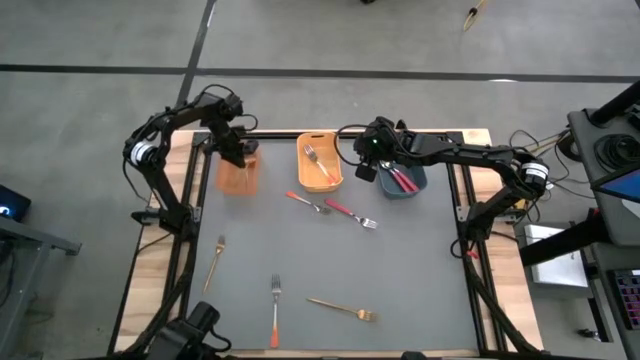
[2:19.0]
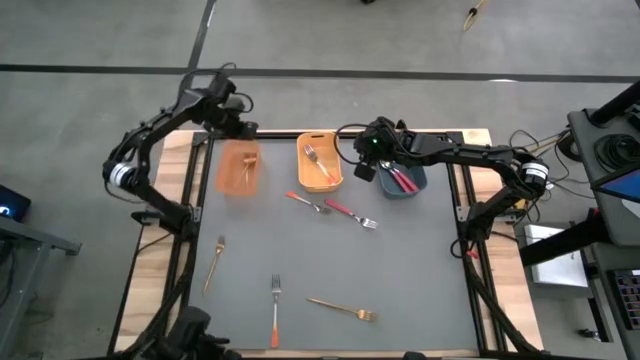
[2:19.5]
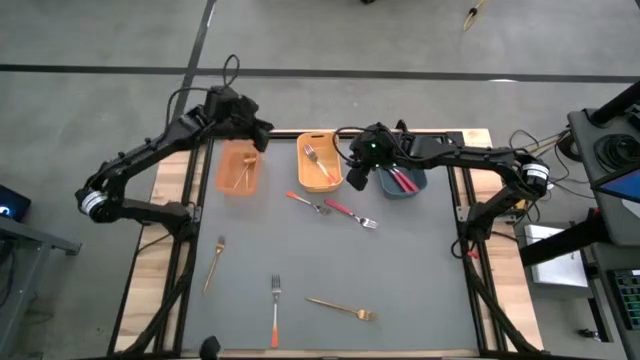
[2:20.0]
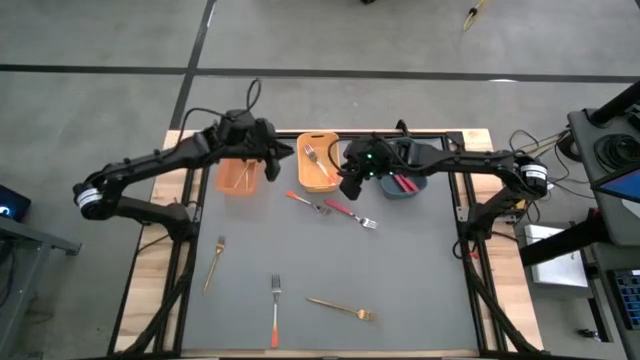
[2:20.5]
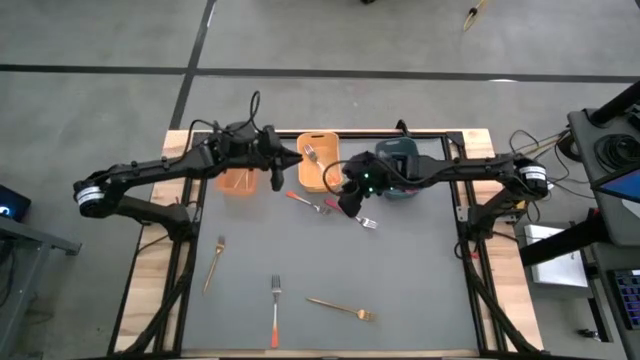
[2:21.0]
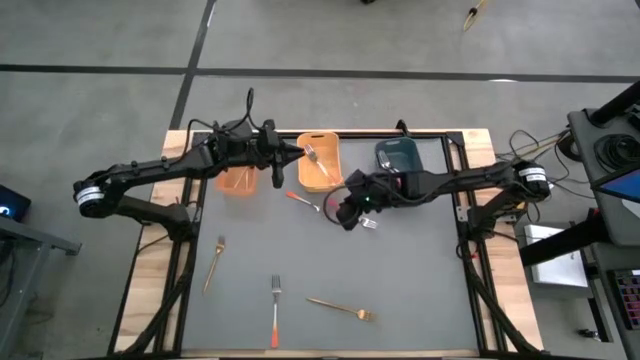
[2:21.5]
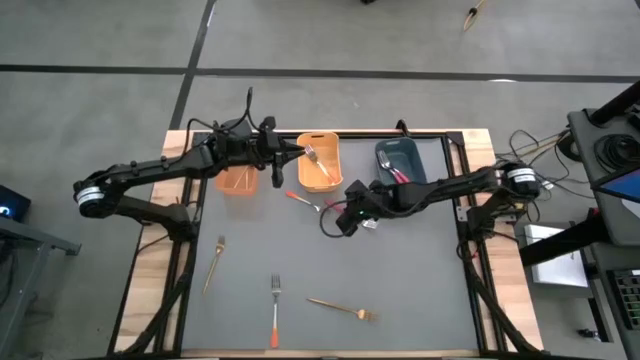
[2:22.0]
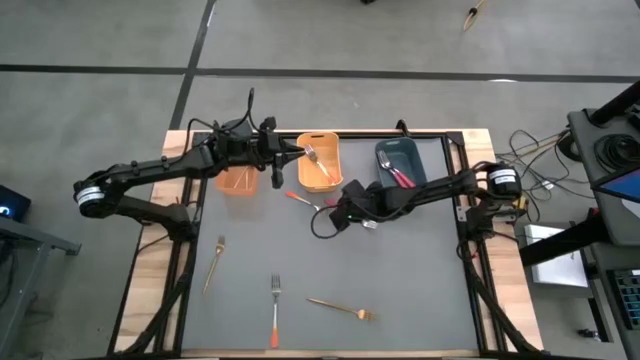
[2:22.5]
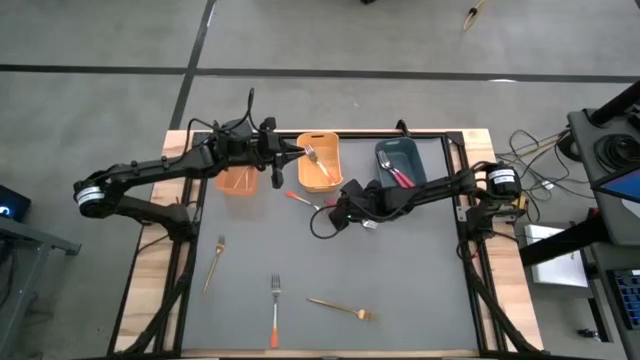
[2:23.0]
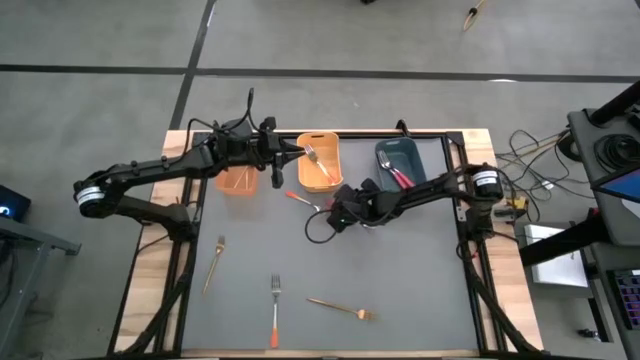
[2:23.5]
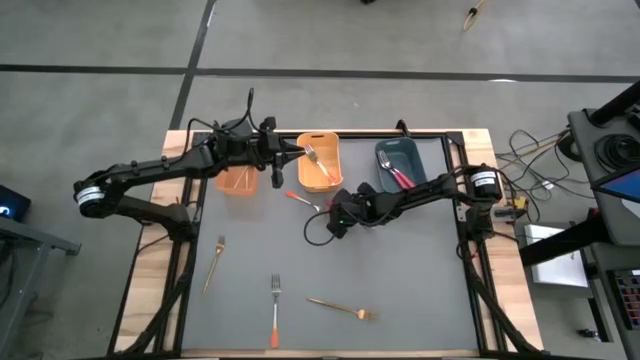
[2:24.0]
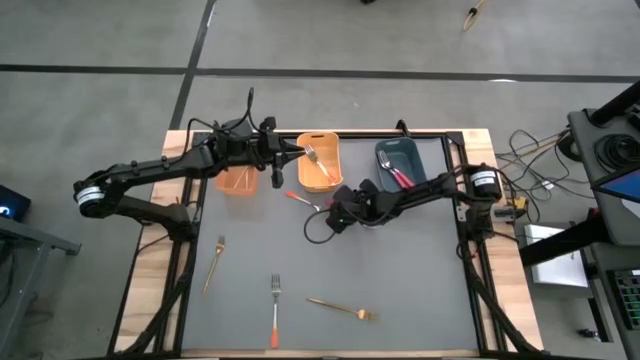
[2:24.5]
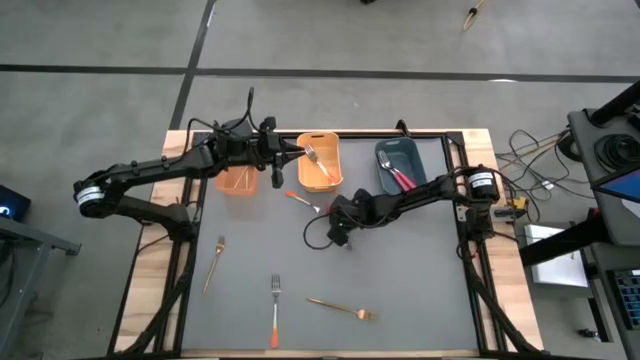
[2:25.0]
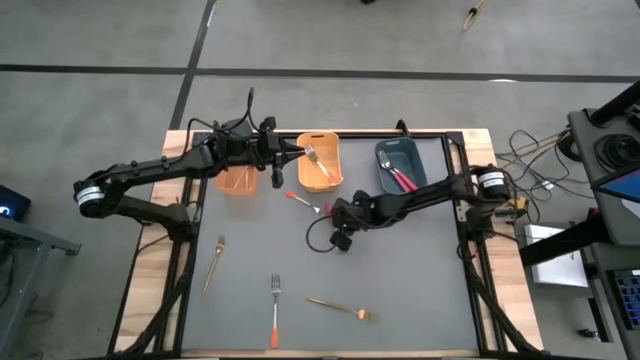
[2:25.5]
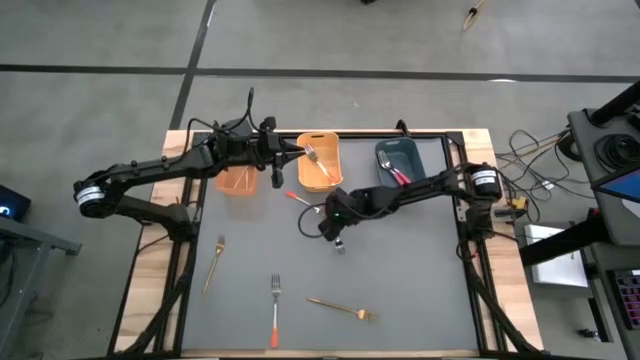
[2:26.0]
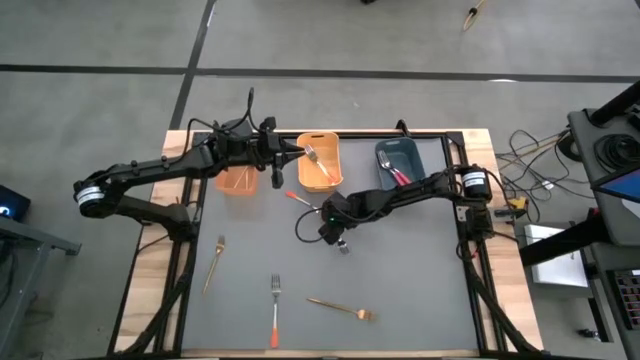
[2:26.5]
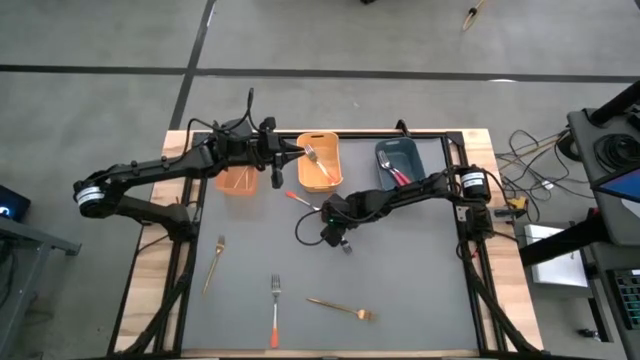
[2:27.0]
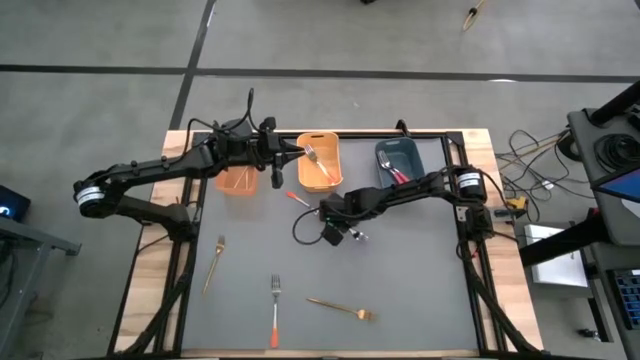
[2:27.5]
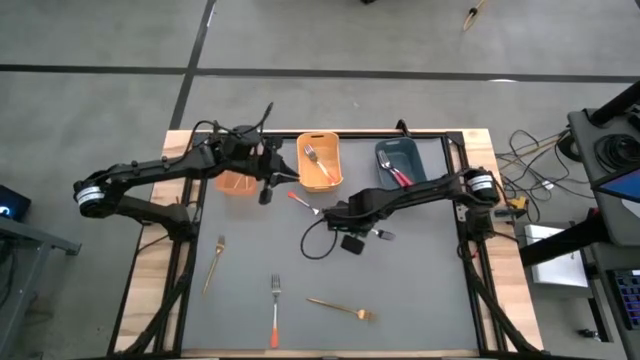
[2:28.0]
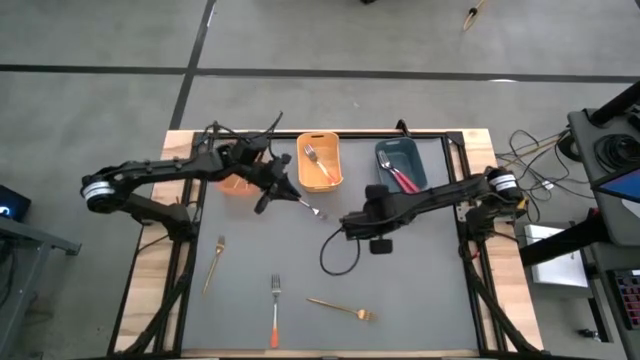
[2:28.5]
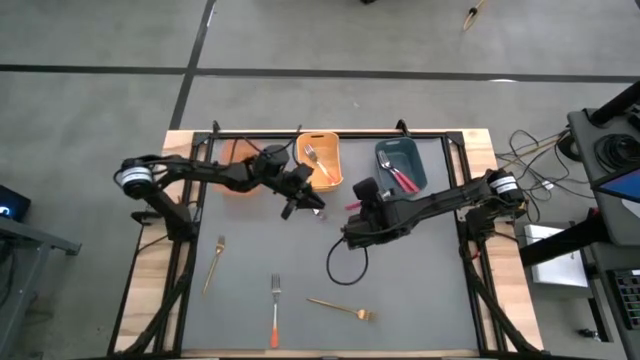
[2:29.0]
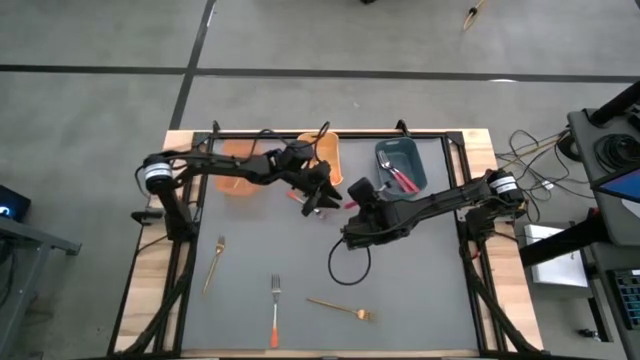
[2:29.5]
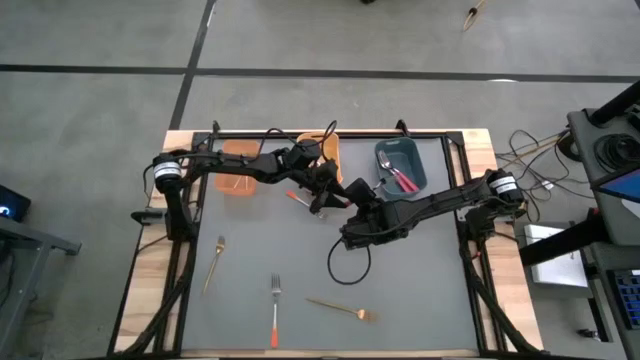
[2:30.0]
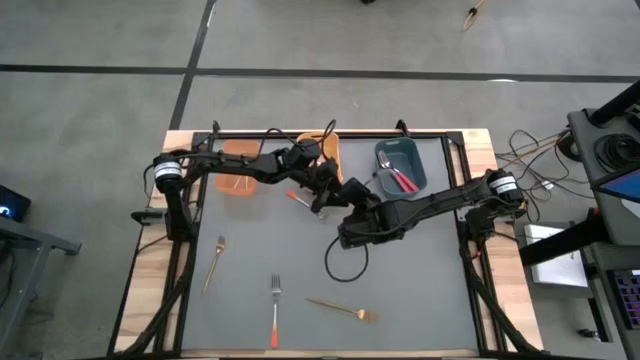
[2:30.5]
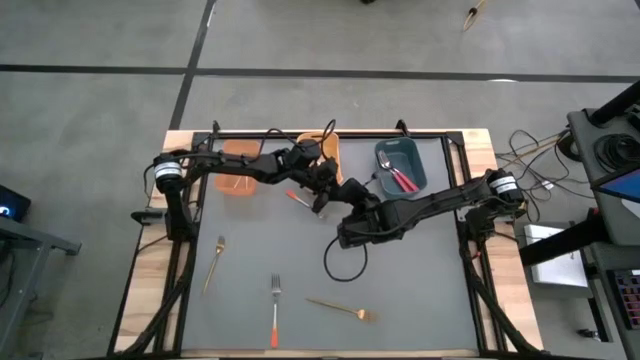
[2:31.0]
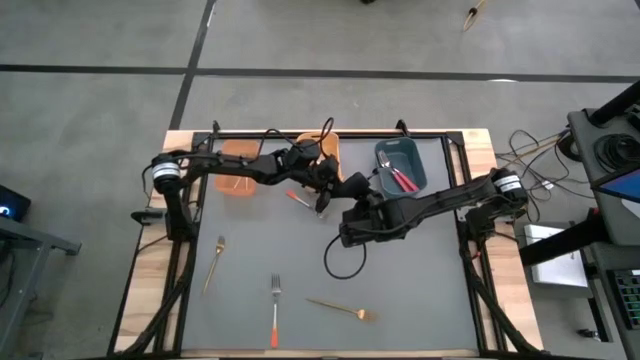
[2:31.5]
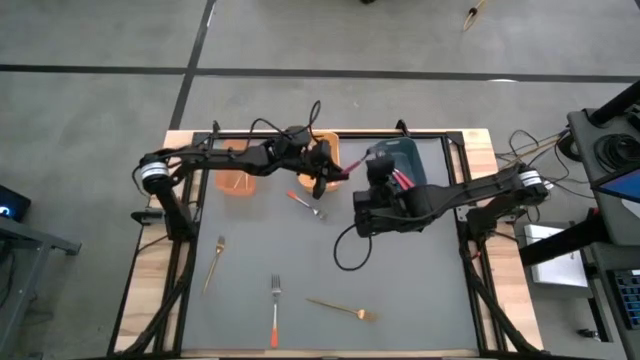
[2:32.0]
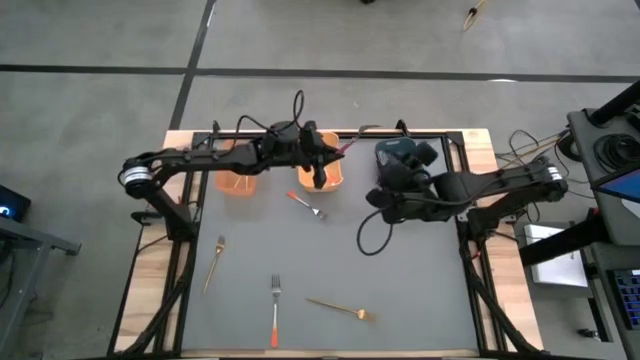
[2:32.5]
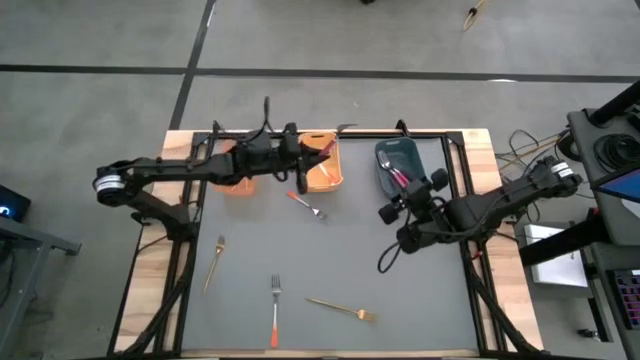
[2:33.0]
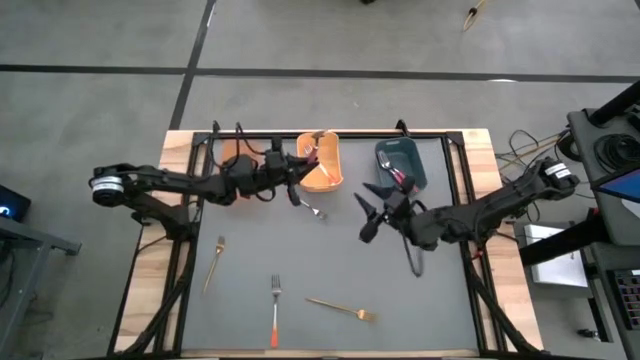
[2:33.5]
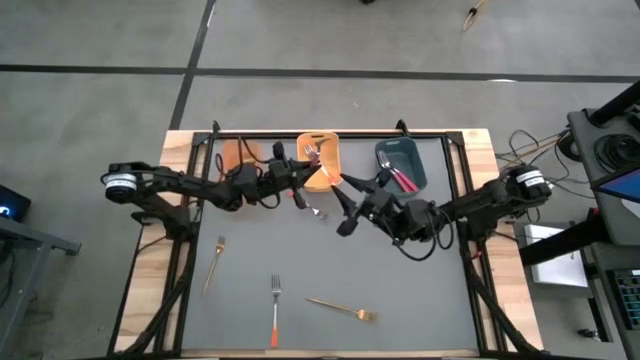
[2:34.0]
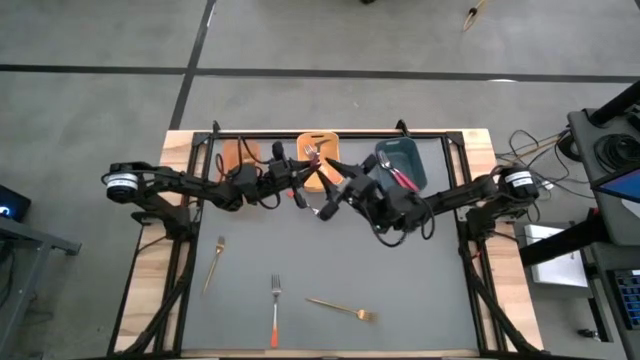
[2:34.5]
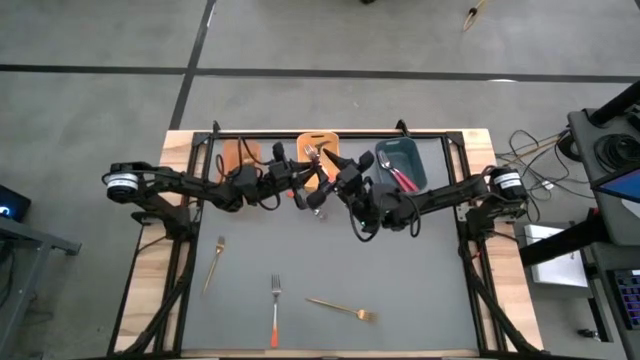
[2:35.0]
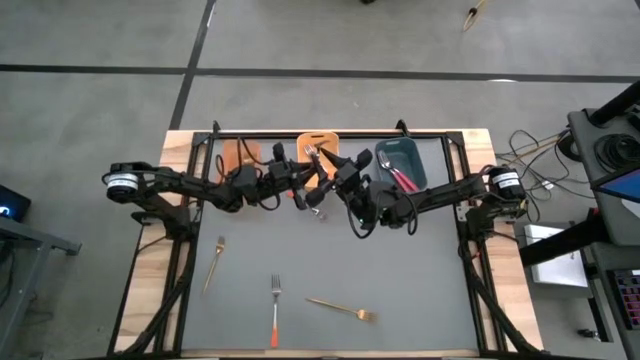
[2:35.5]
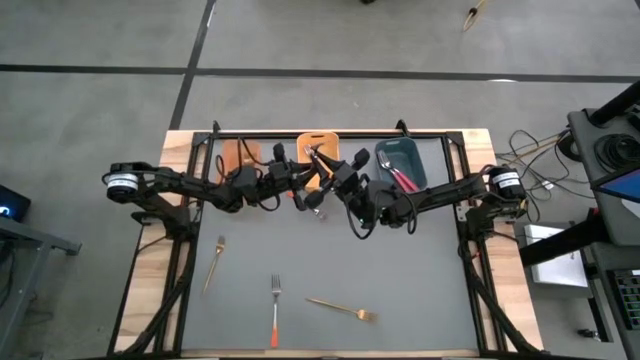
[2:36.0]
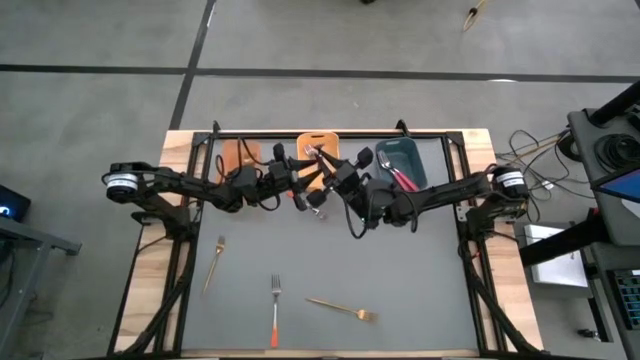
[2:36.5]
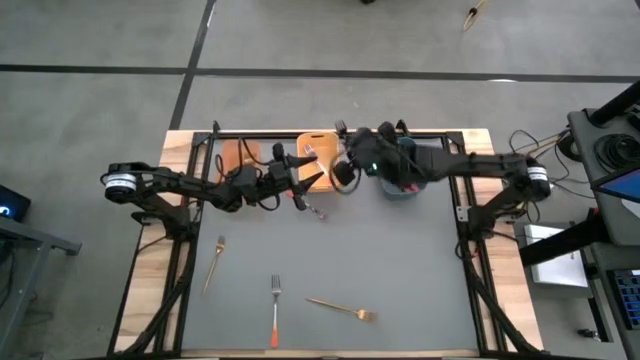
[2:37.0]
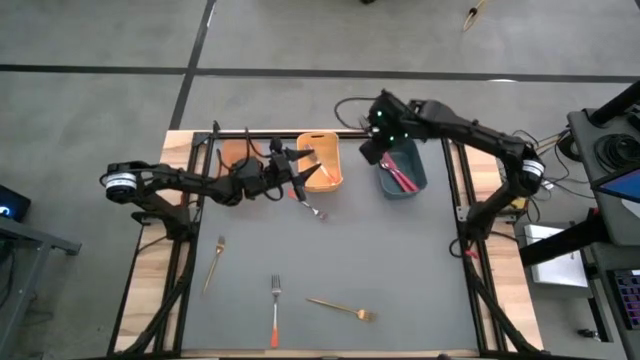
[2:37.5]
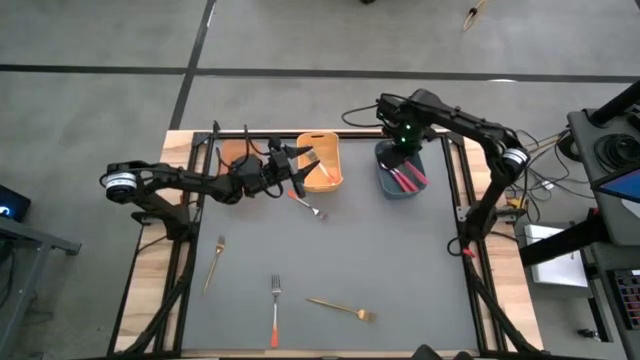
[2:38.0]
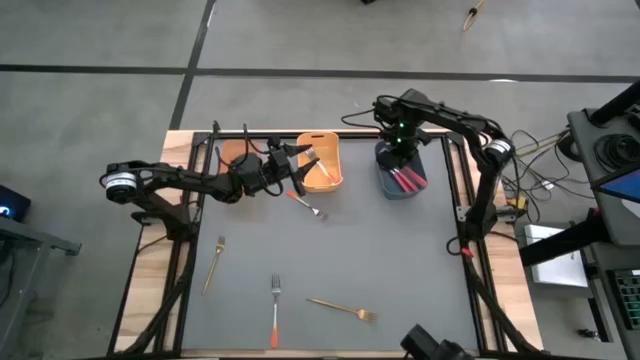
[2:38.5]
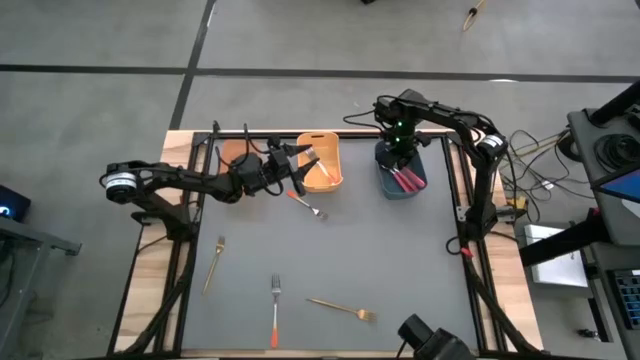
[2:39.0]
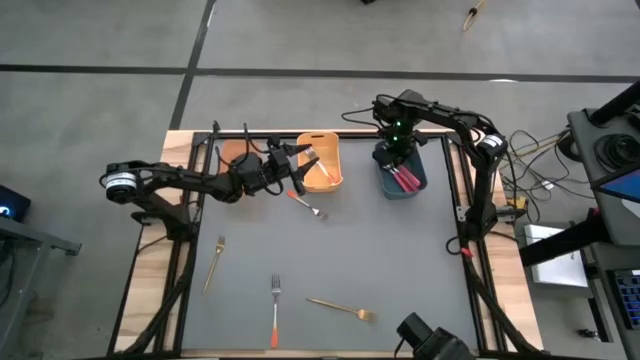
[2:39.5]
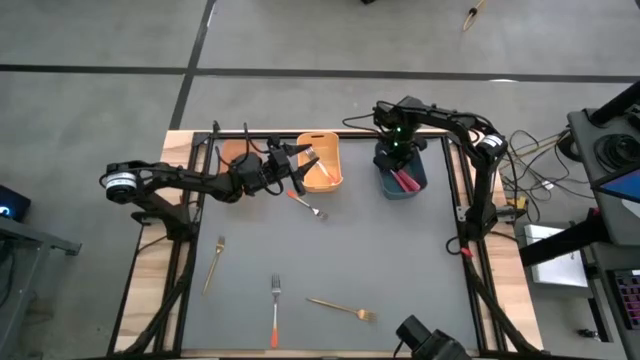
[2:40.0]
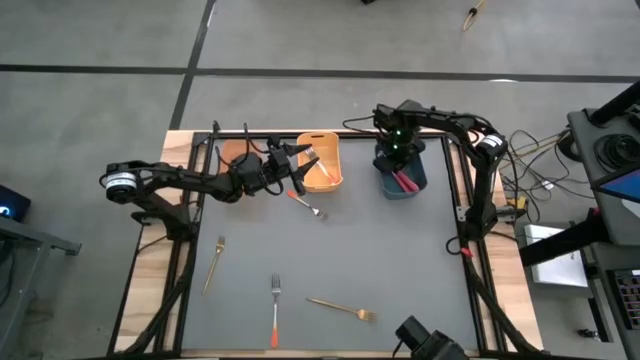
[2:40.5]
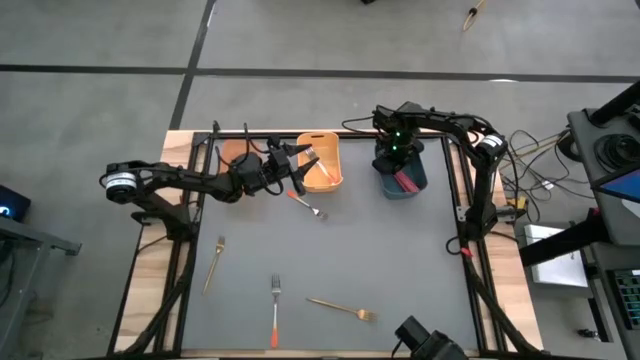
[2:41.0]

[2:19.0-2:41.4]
Task: Sort silverware by color (type)
Put the red fork into the blue bin
